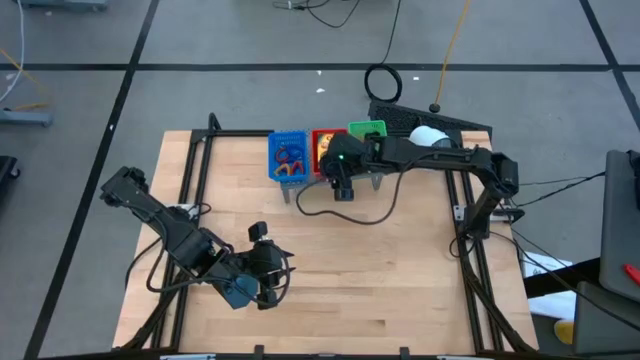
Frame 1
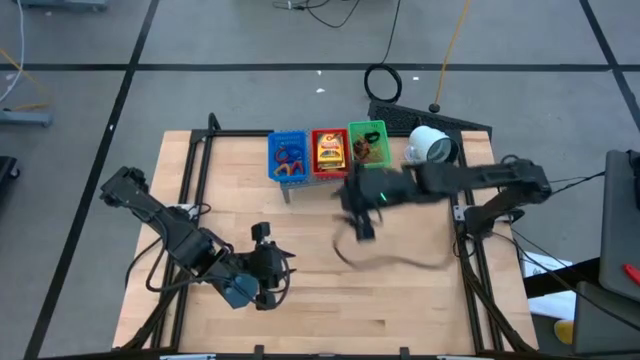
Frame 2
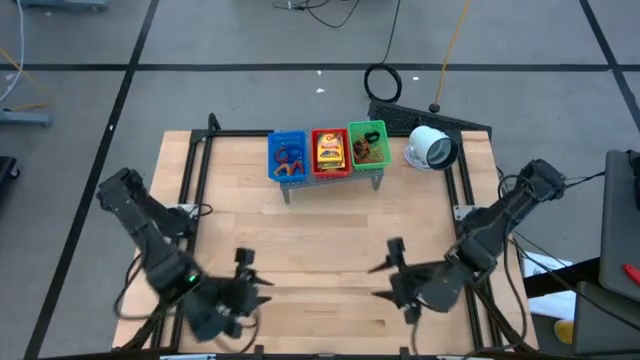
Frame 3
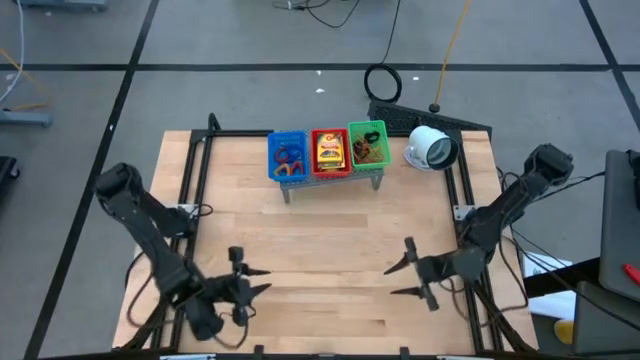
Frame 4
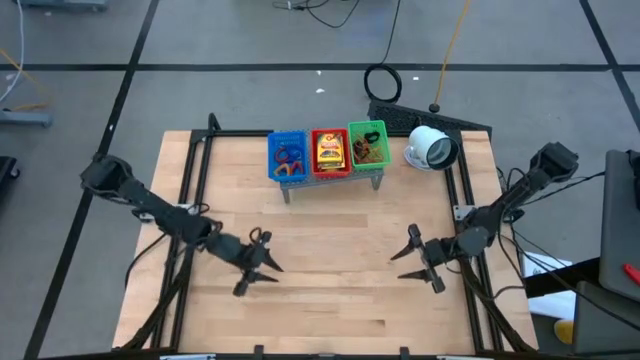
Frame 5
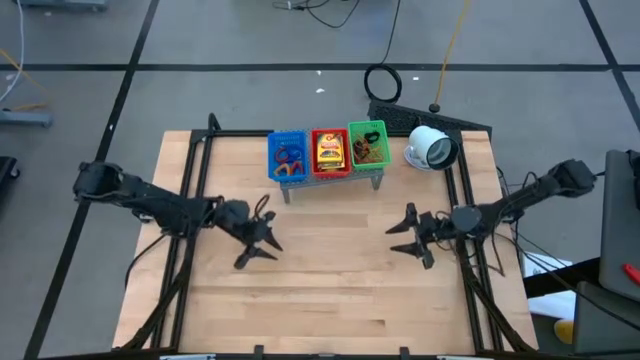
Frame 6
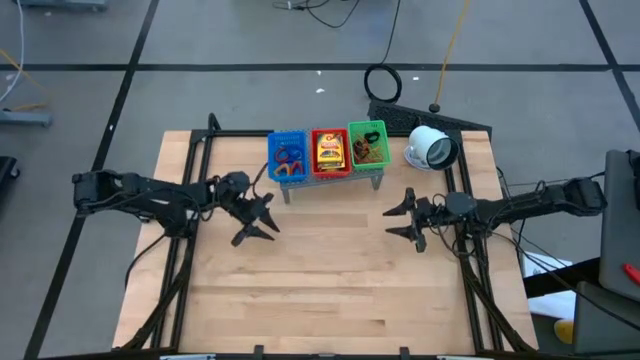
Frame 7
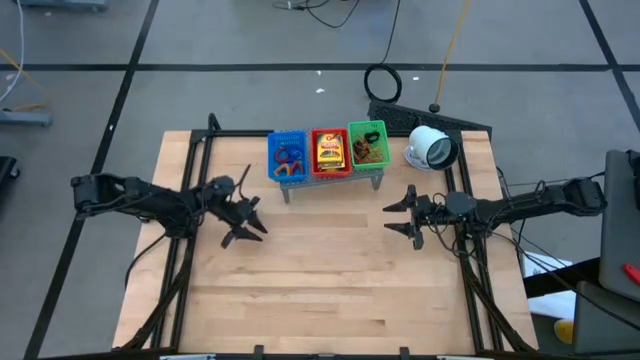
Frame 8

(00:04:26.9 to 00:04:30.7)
Task: Pick & Place Office Desk Supplies
Return to Home Position

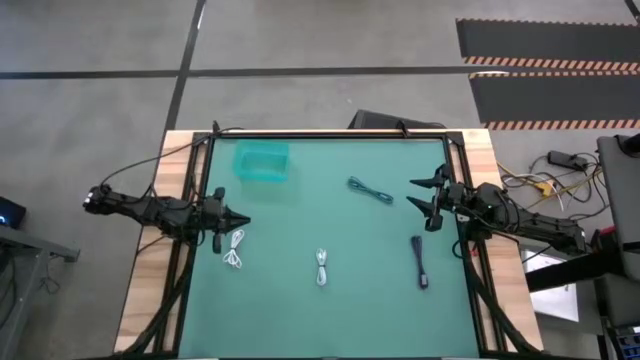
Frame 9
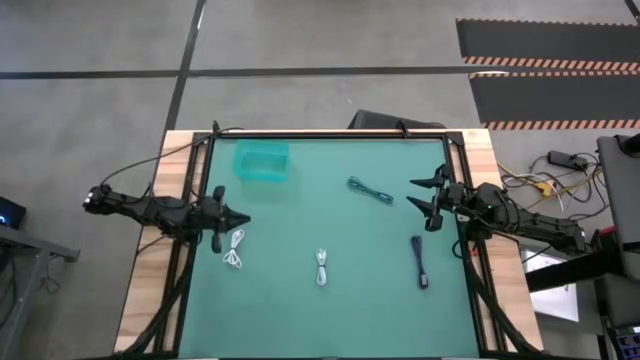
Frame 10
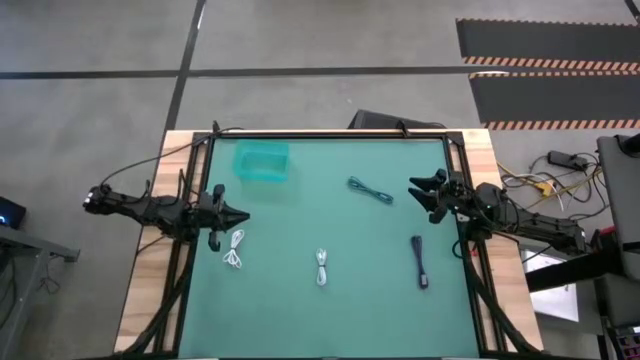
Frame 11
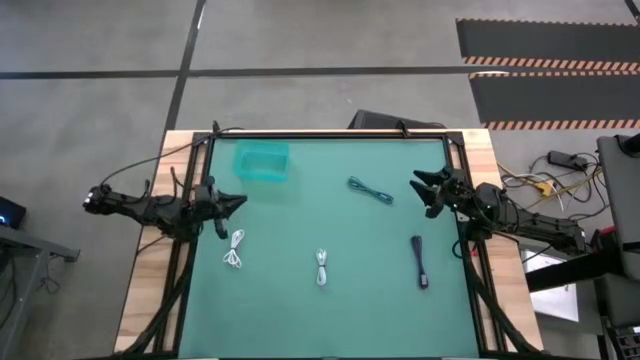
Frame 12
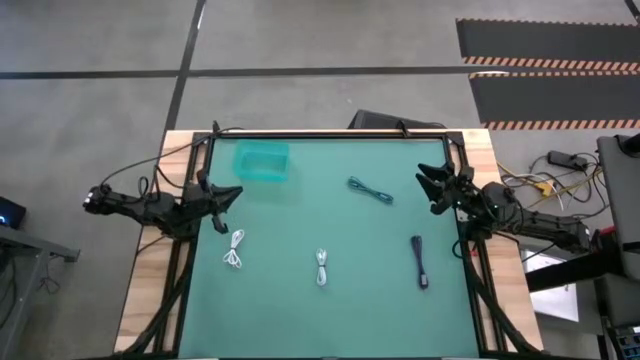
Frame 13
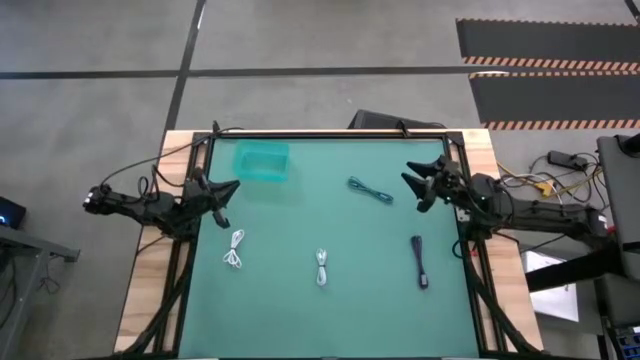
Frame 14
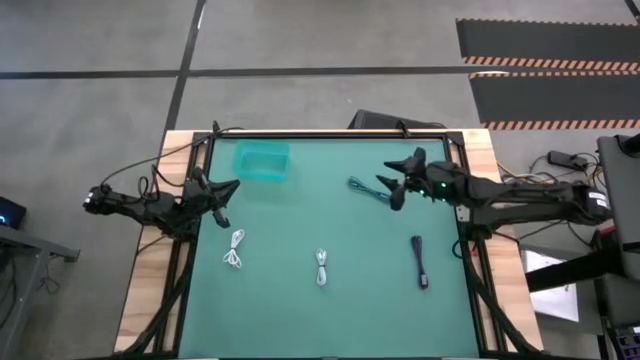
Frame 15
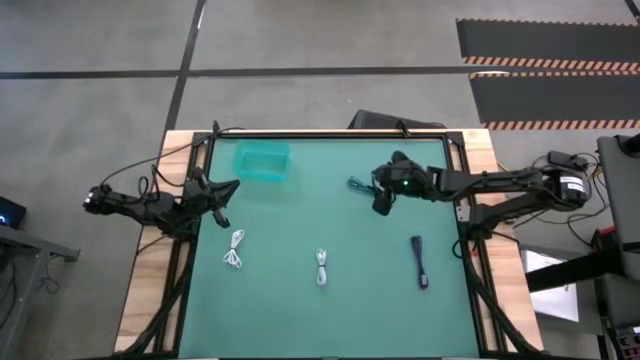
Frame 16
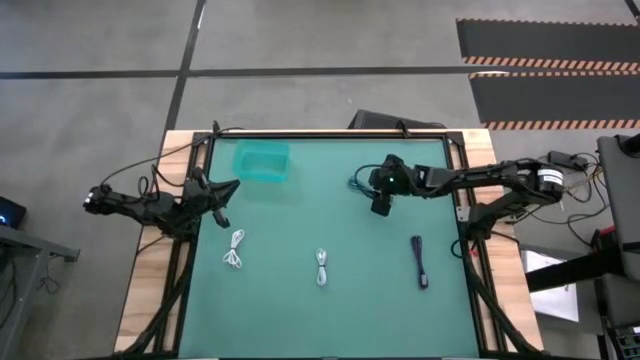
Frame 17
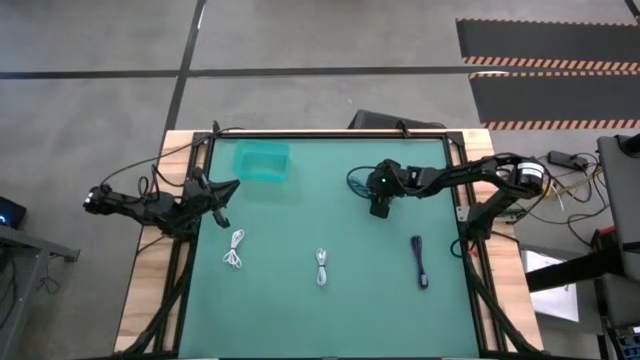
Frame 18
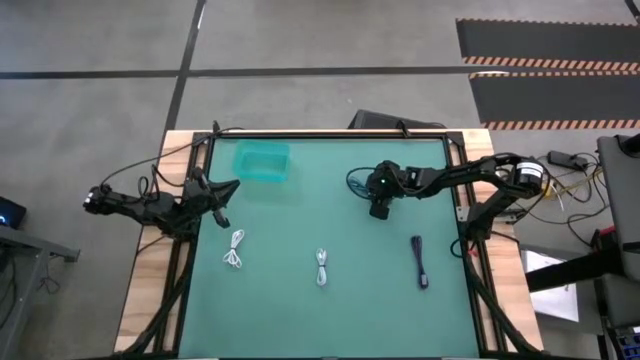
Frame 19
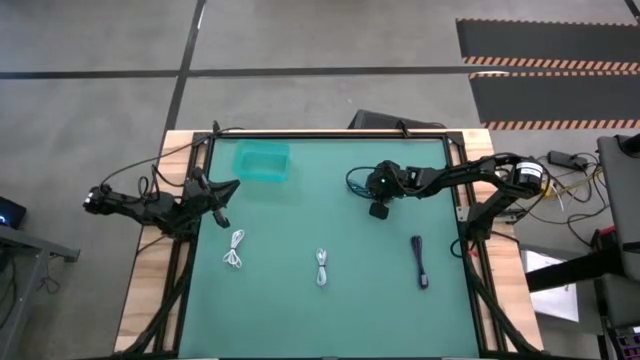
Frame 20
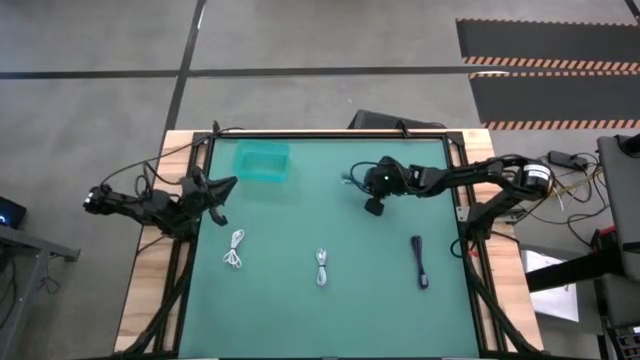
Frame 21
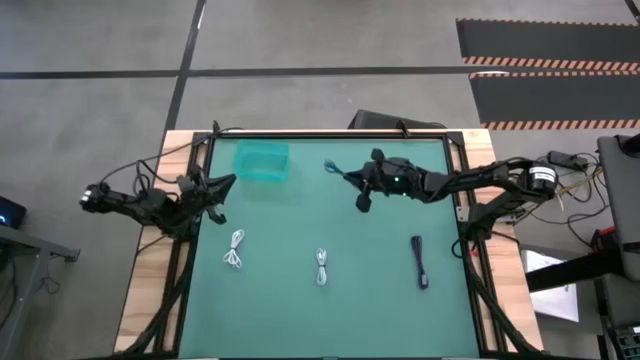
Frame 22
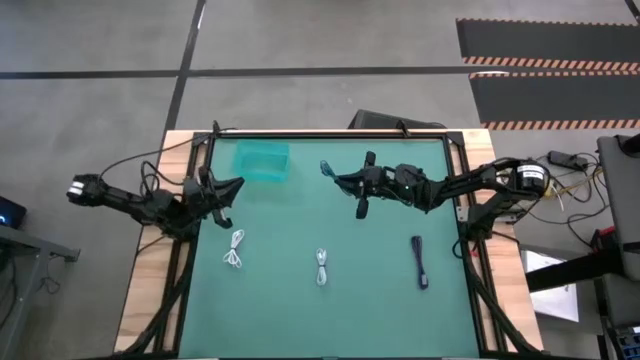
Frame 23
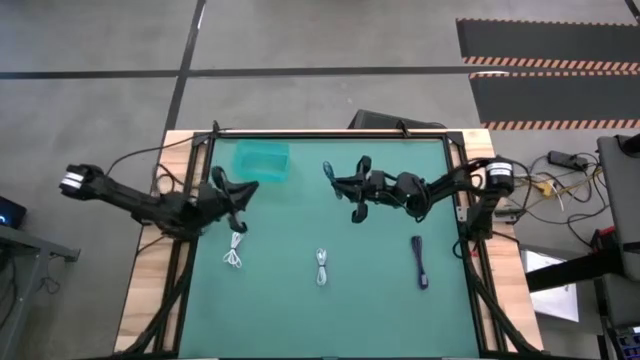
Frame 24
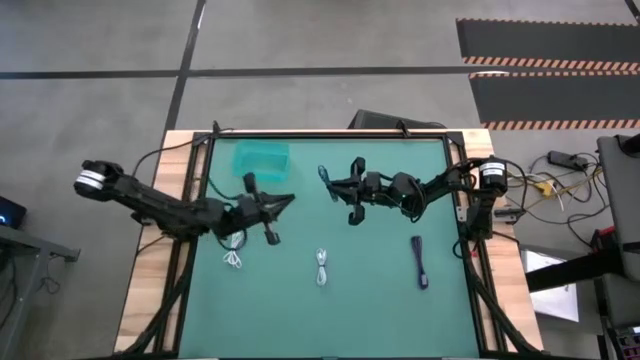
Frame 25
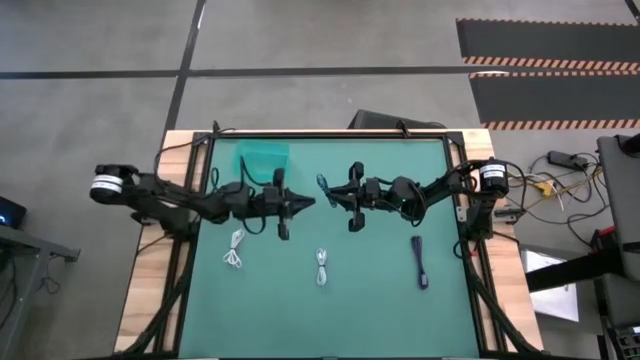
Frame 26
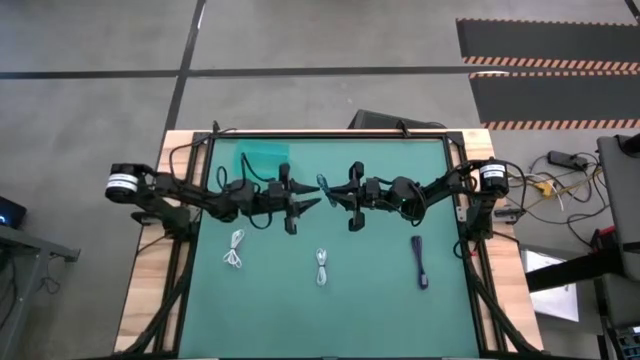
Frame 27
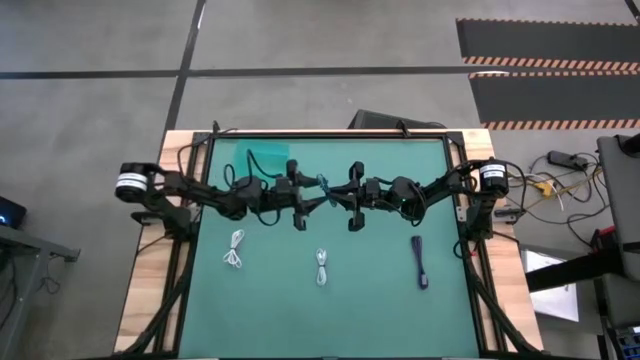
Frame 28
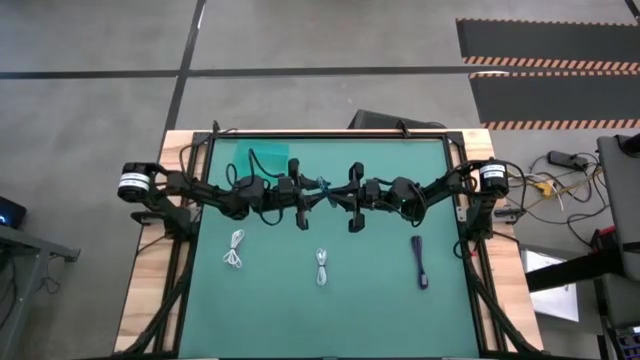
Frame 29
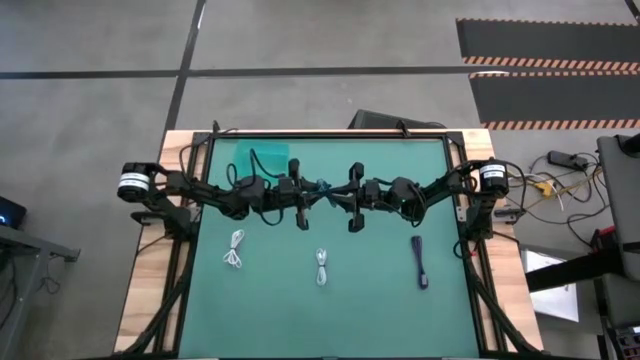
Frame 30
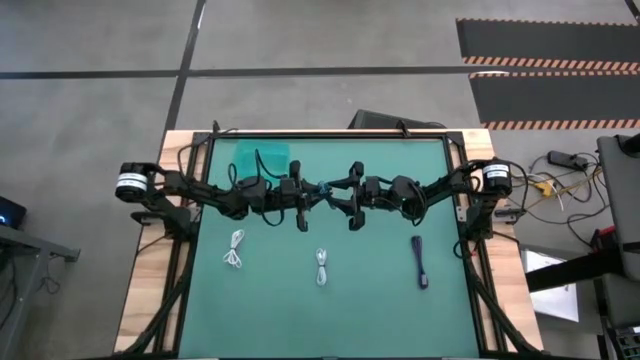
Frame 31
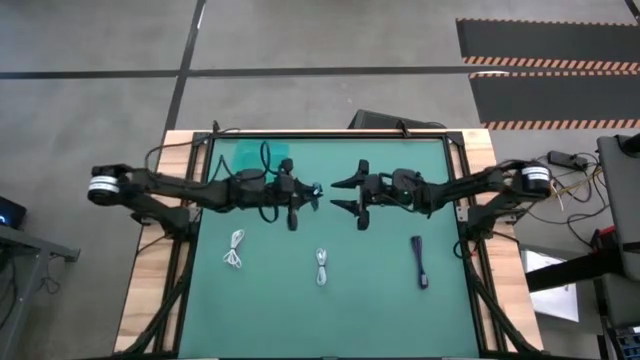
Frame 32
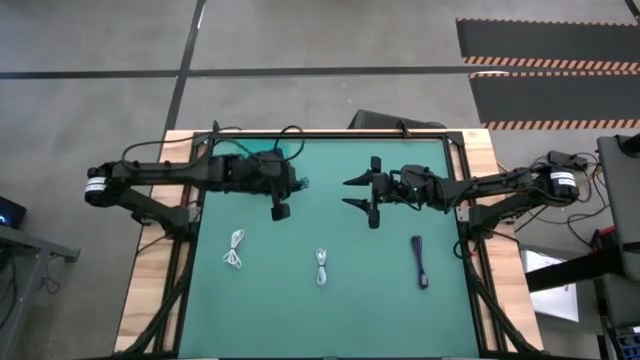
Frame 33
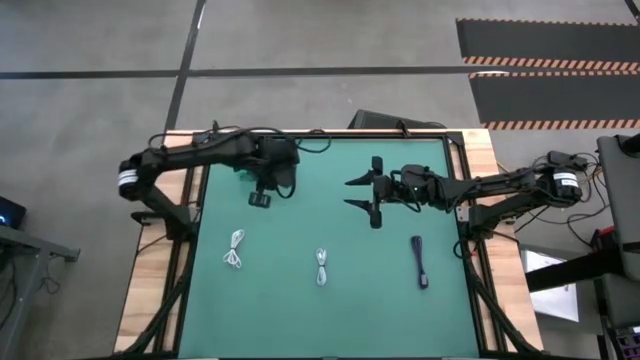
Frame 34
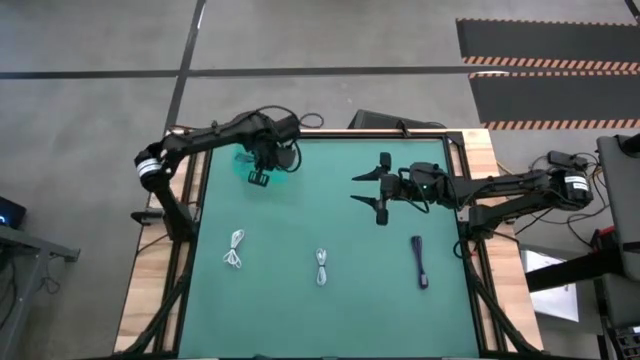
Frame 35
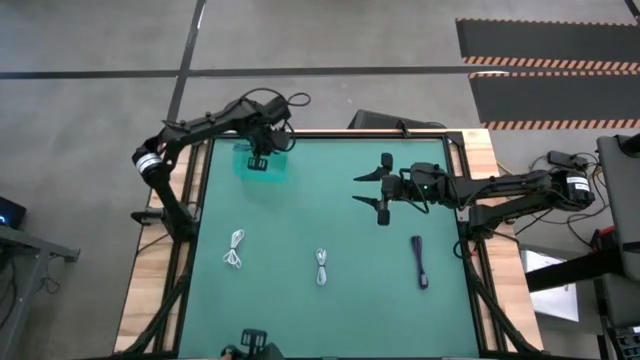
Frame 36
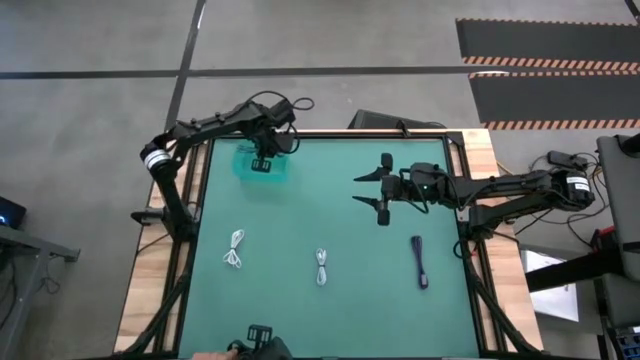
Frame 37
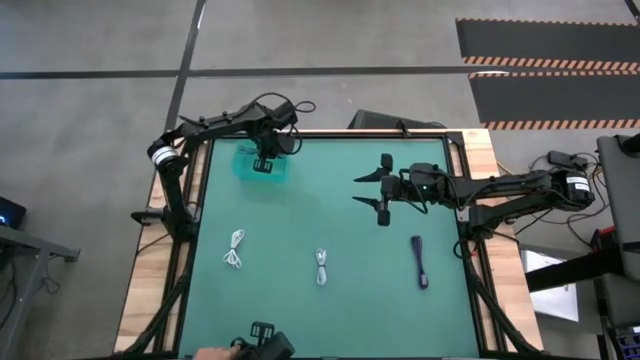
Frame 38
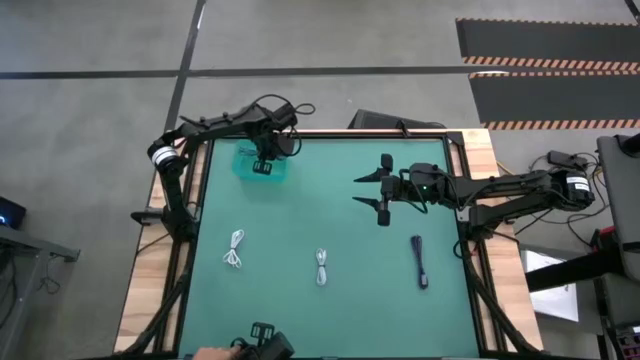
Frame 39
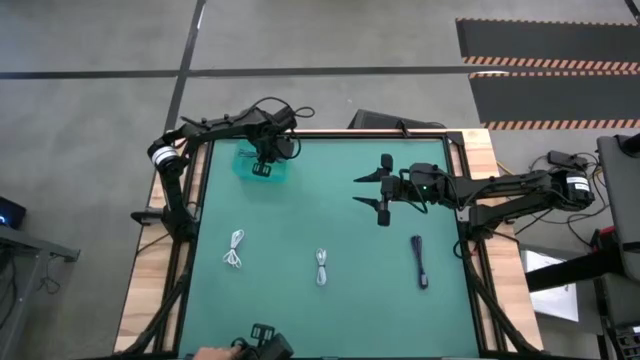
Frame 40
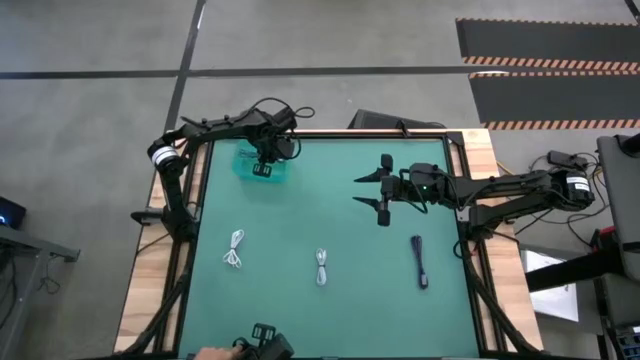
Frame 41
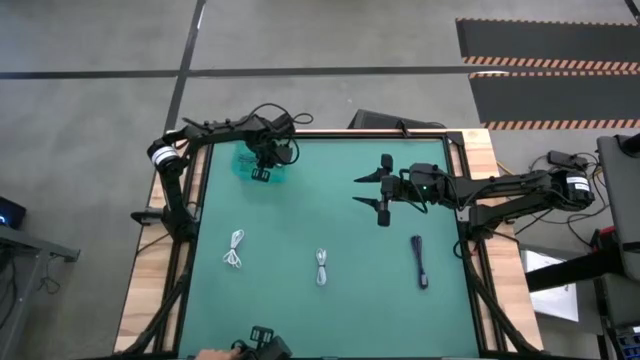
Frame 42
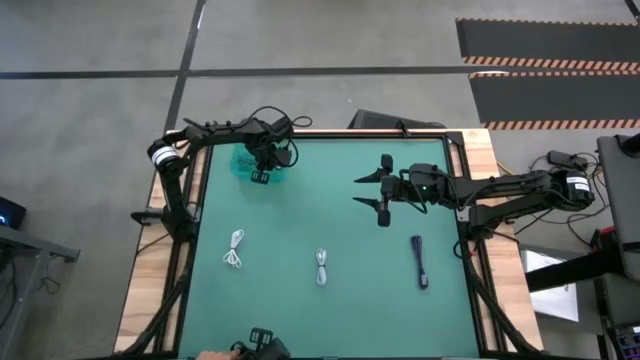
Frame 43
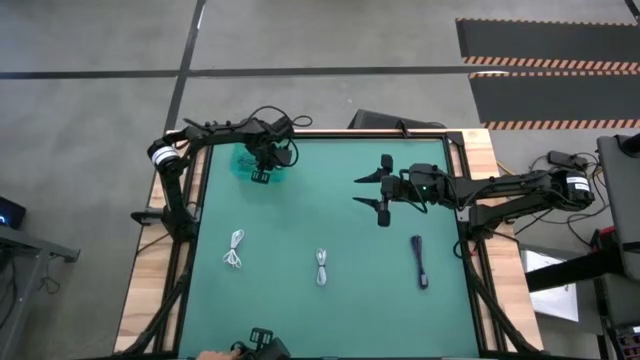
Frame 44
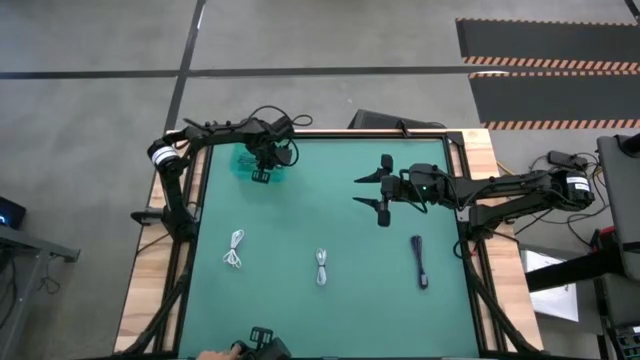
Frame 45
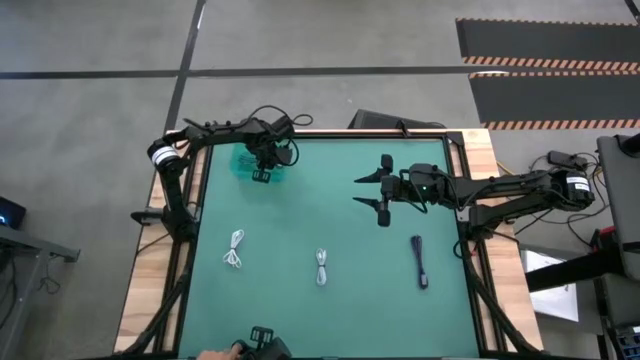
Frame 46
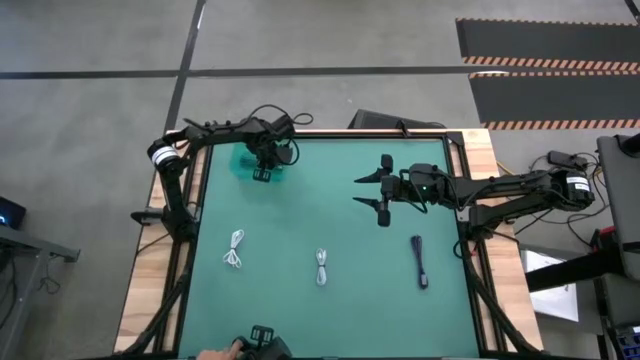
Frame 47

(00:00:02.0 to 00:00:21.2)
Task: Pick and place USB-C Cables
Put the blue USB cable into the blue bin
